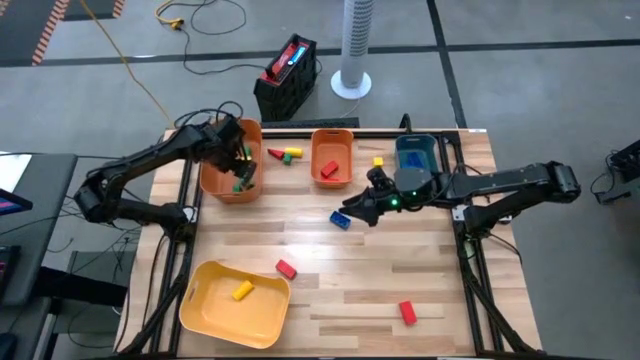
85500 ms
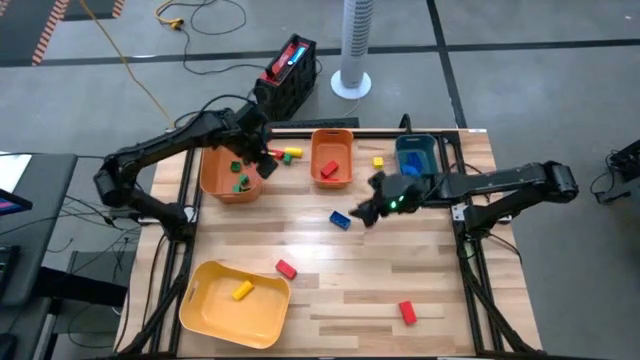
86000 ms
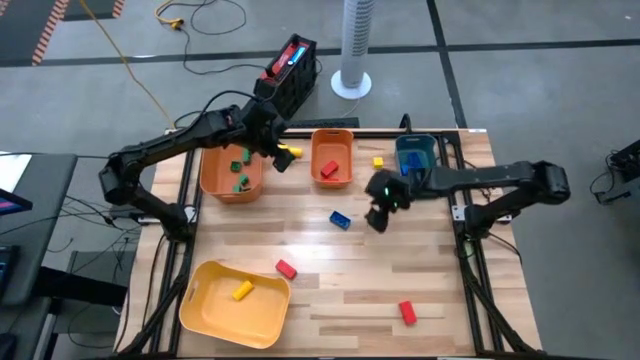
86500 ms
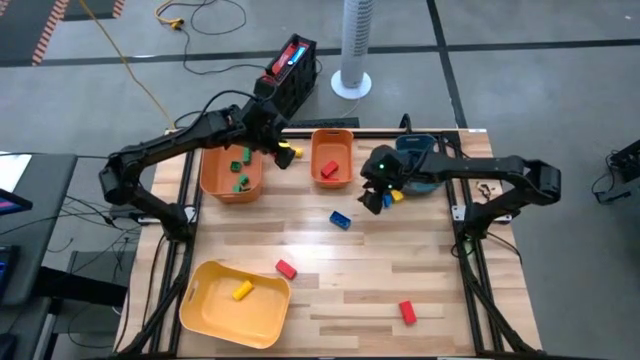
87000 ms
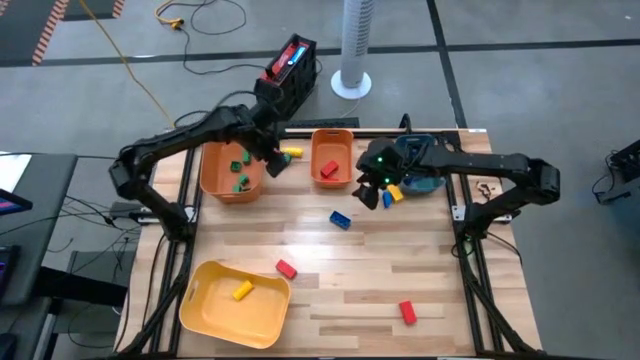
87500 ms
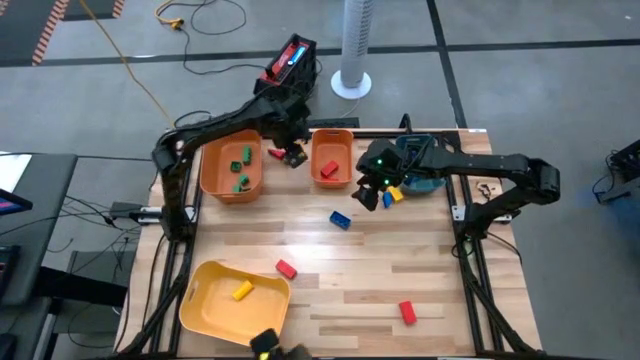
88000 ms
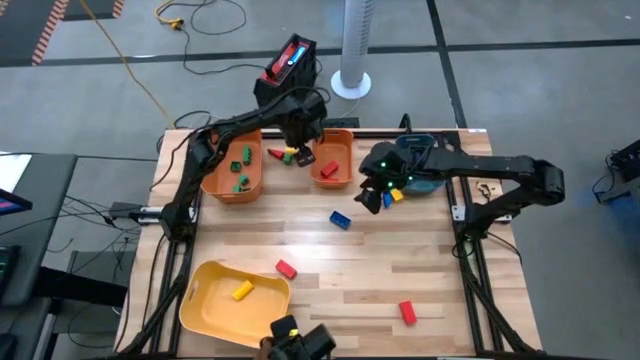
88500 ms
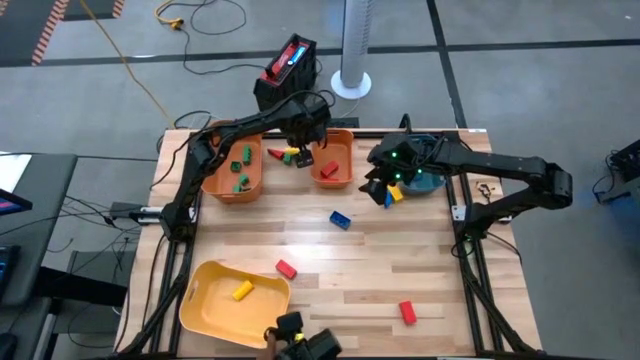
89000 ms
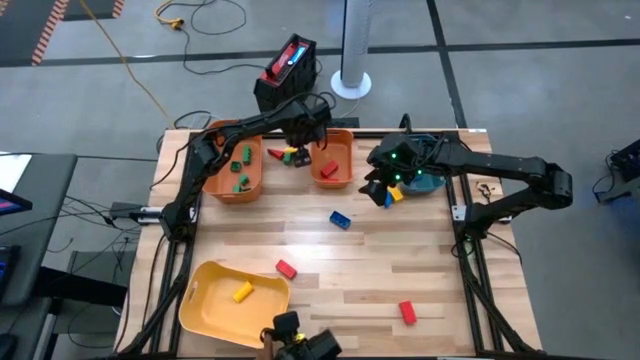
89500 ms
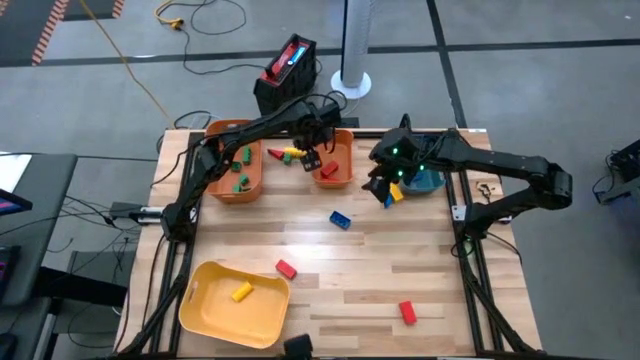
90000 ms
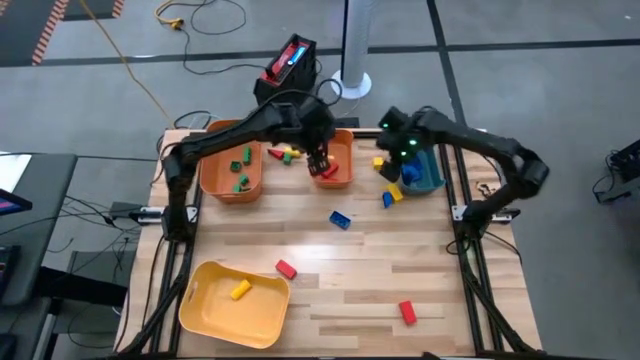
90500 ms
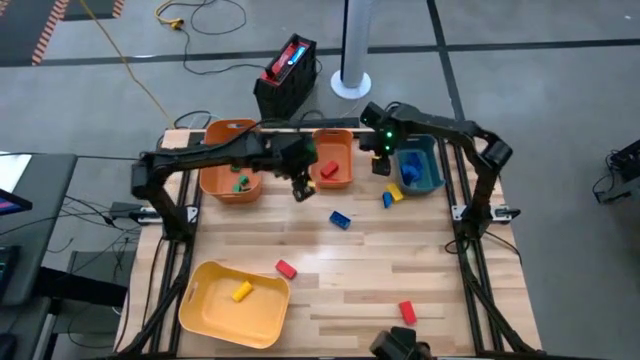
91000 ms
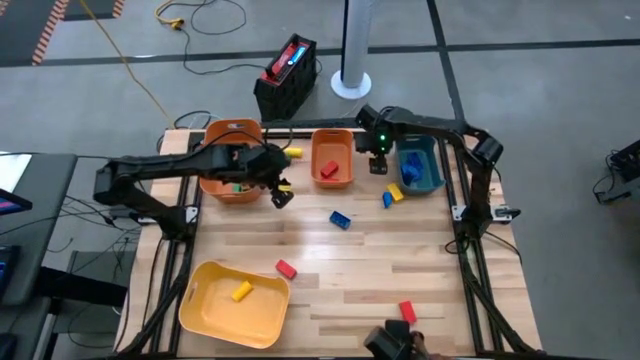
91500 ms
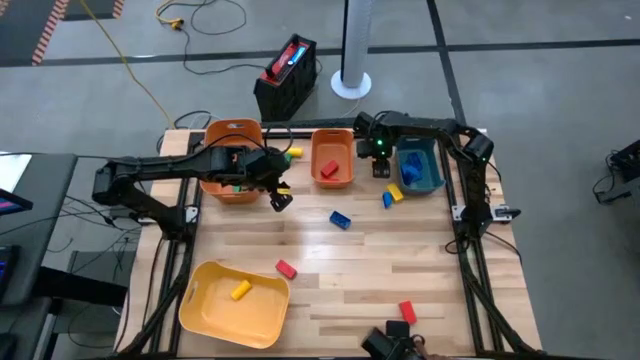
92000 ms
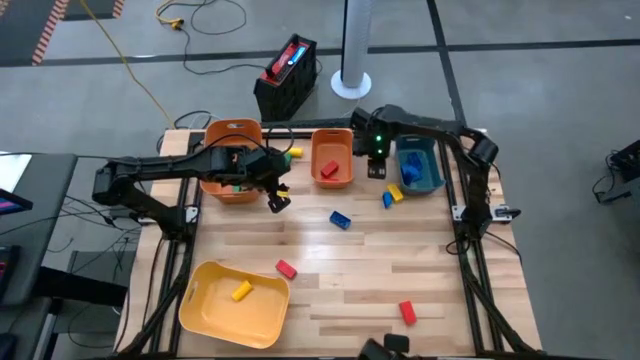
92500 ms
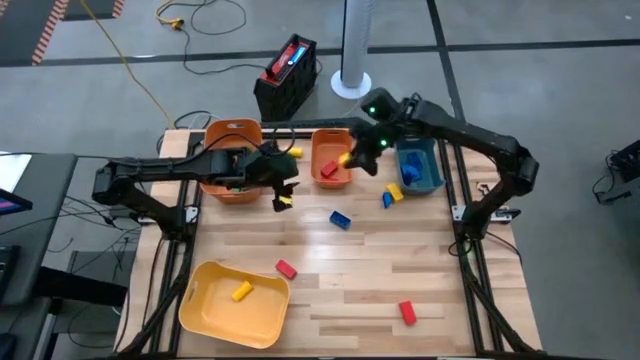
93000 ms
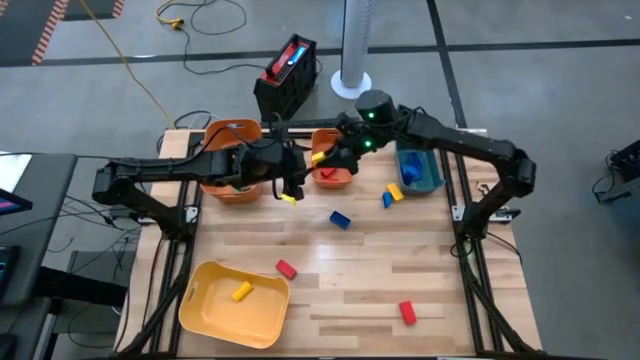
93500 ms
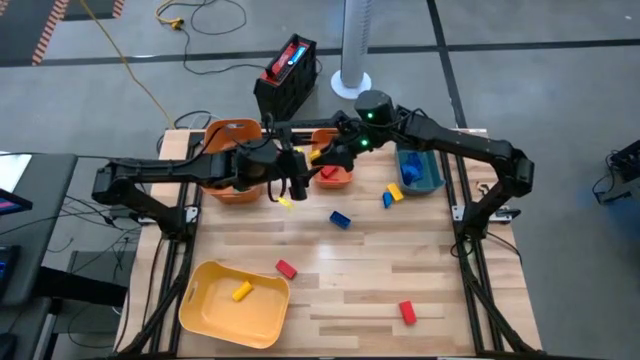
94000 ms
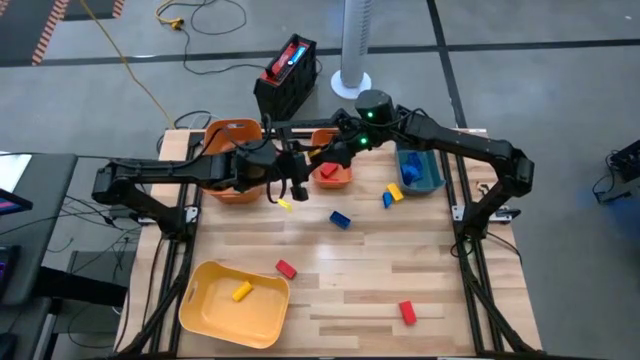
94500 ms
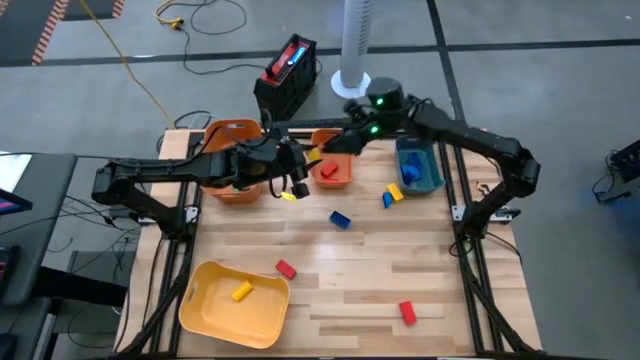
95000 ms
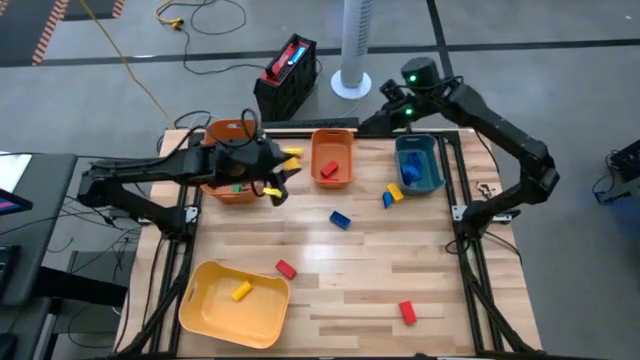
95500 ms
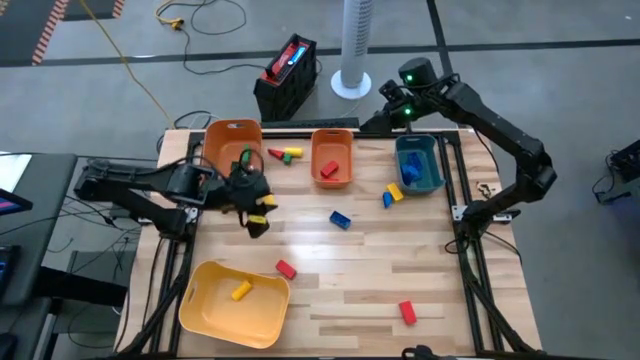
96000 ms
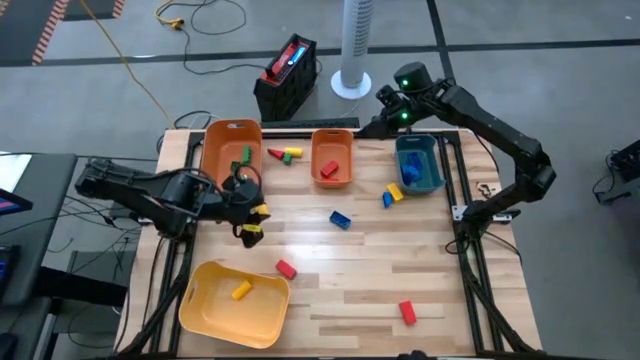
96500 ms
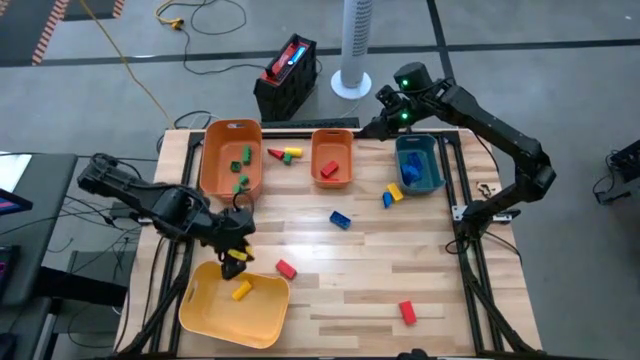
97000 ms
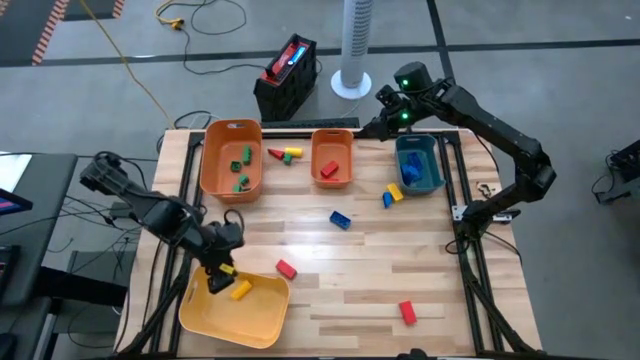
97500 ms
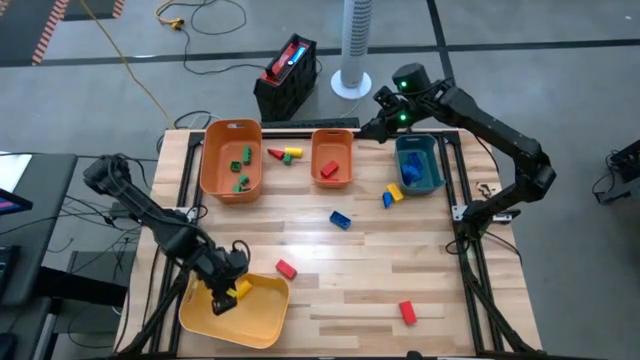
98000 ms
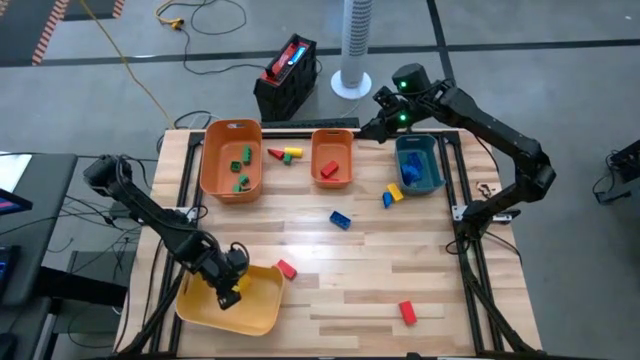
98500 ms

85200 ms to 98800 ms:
Task: Sort blocks
Put the yellow block into the yellow bin

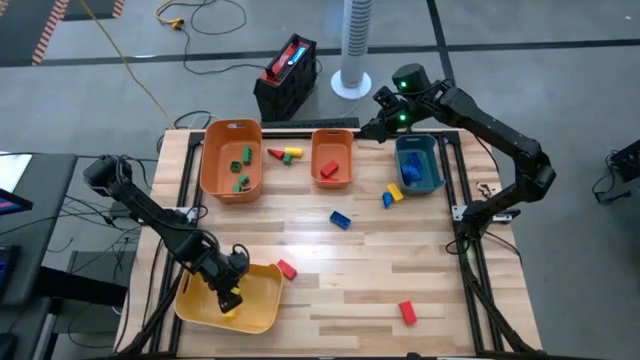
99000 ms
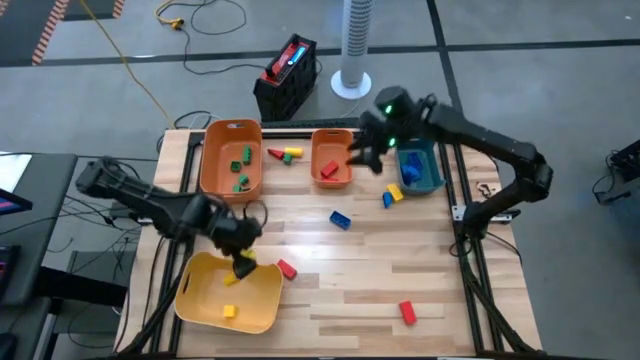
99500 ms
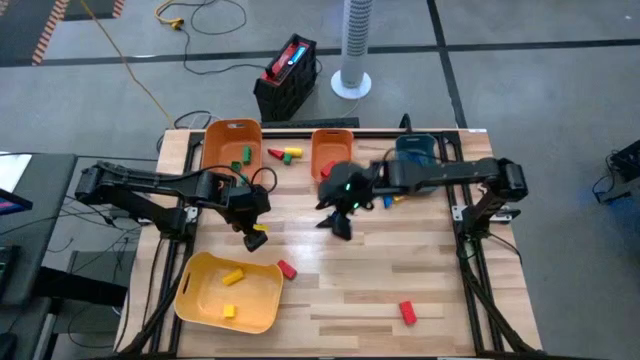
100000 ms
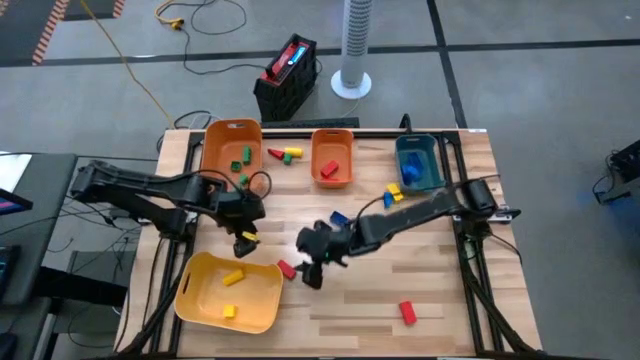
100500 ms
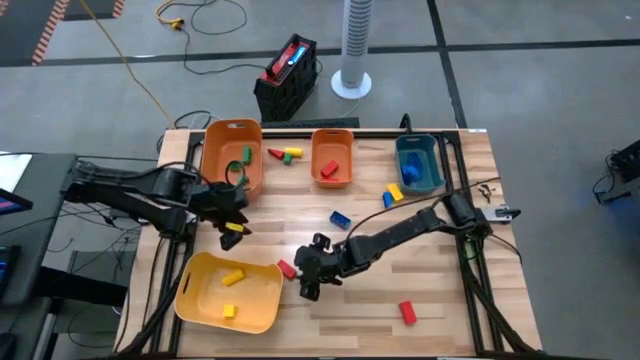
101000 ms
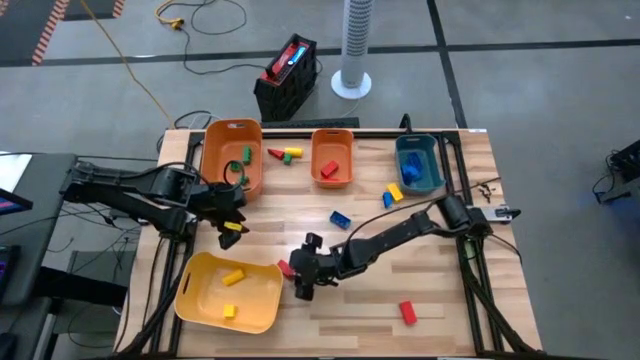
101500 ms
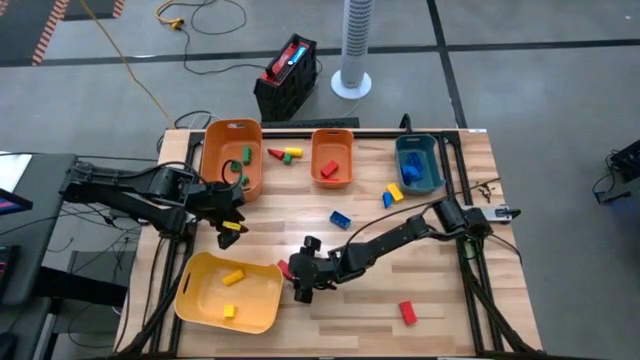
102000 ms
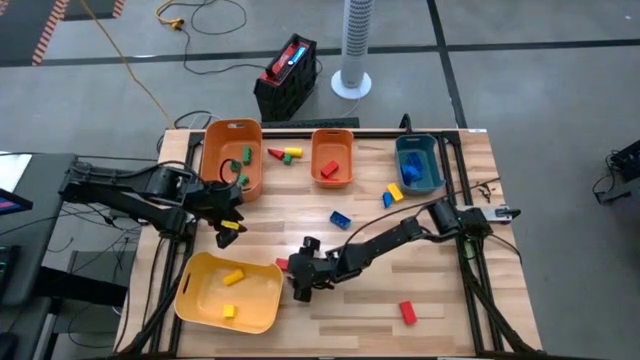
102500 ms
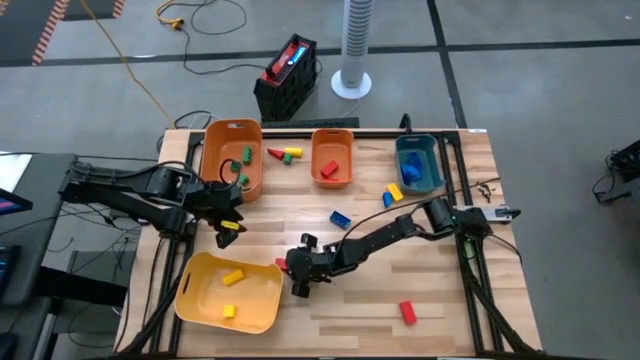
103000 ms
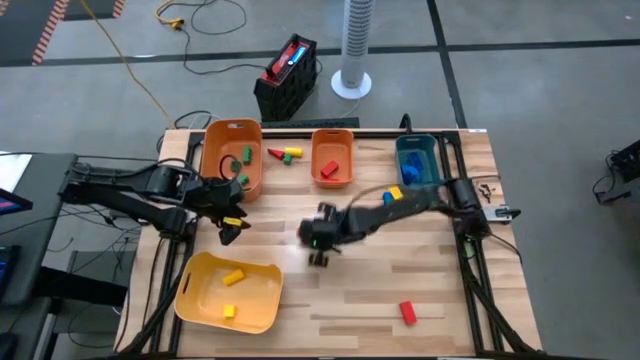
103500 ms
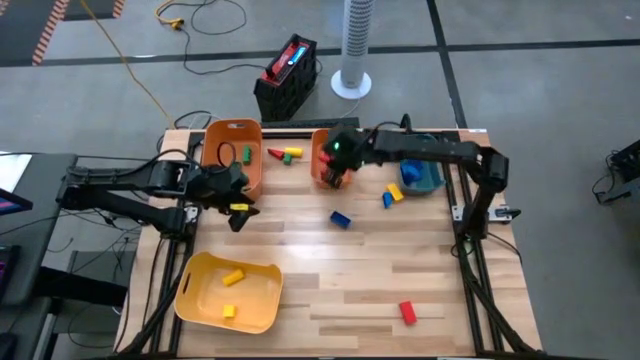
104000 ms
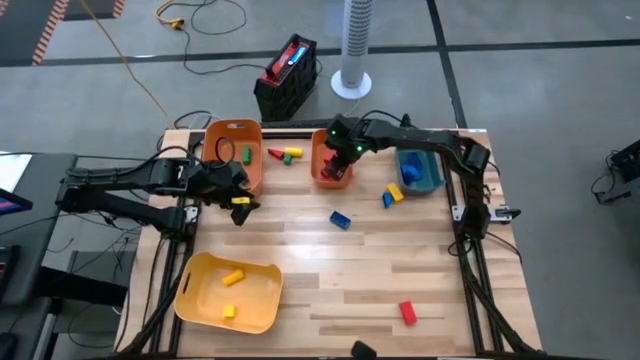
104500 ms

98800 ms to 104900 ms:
Put the red block into the right orange bin

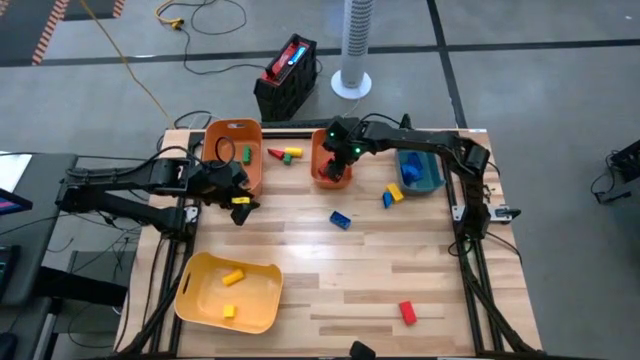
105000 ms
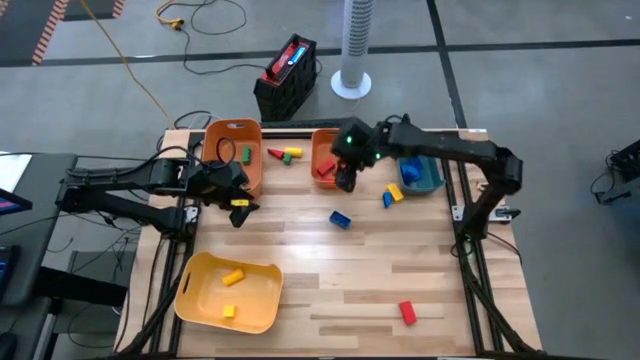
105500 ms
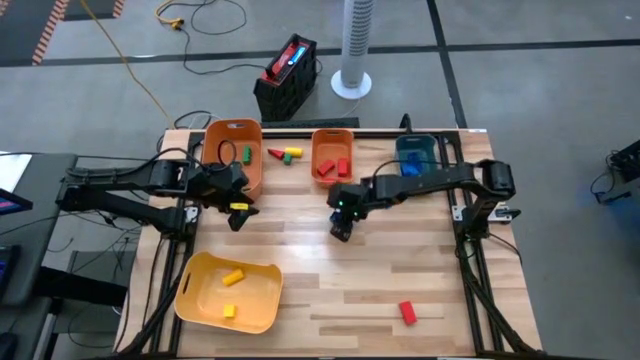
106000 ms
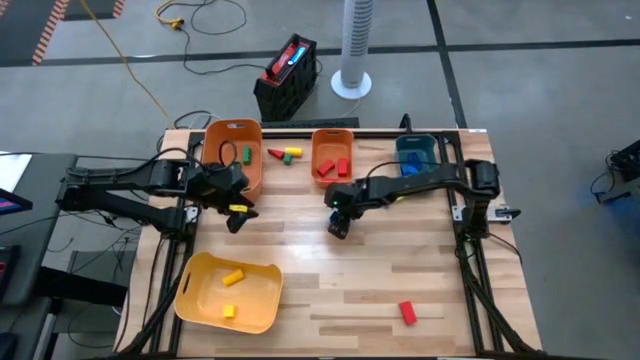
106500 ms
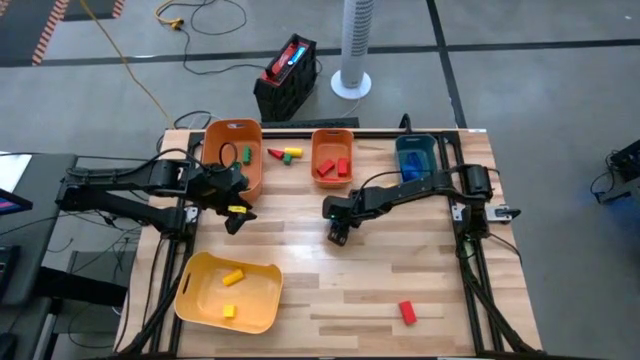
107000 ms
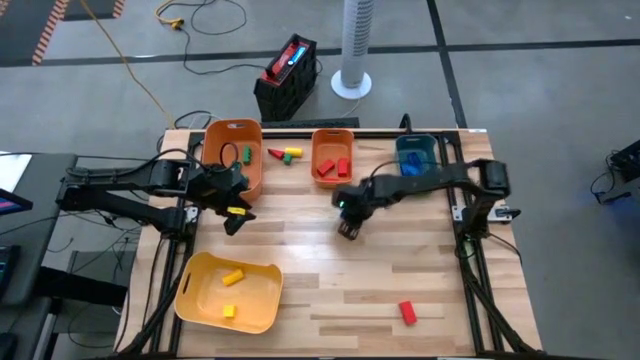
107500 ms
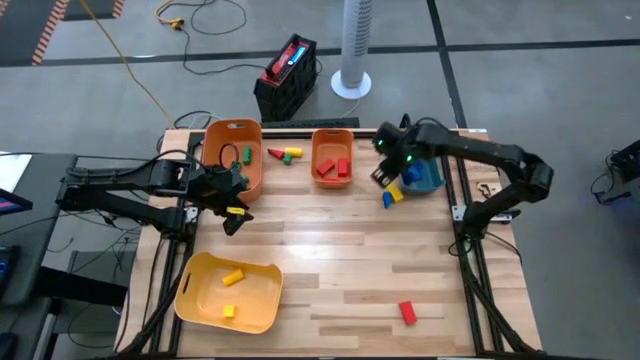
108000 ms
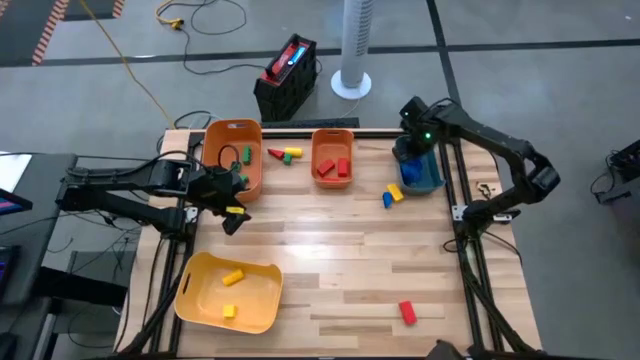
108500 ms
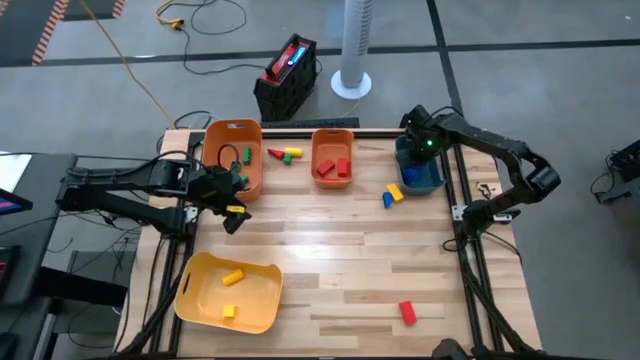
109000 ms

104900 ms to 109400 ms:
Put the blue game piece into the green bin
